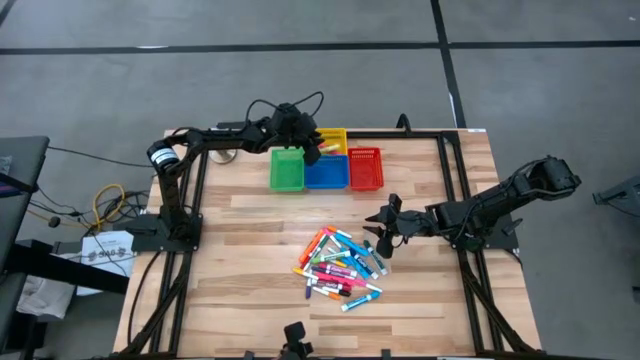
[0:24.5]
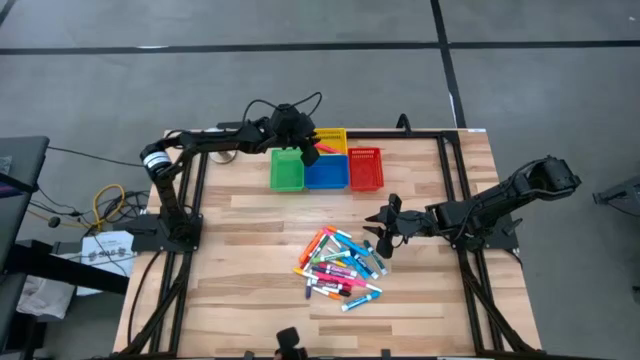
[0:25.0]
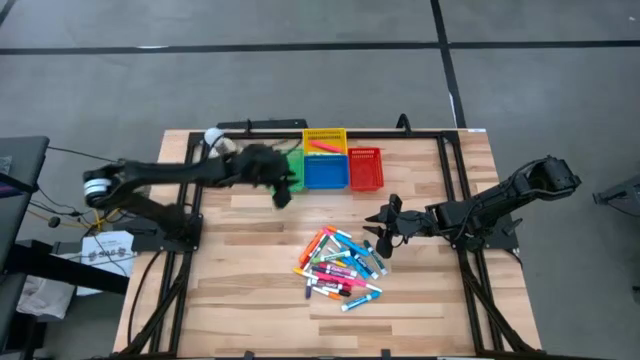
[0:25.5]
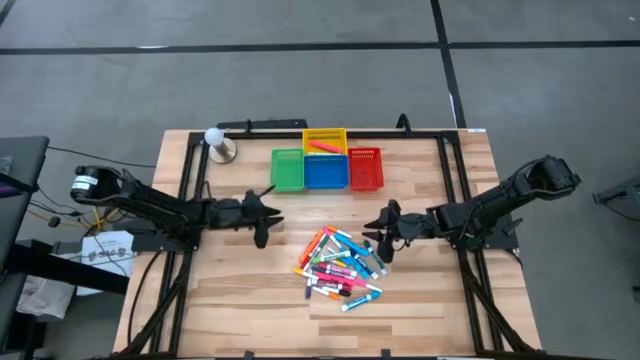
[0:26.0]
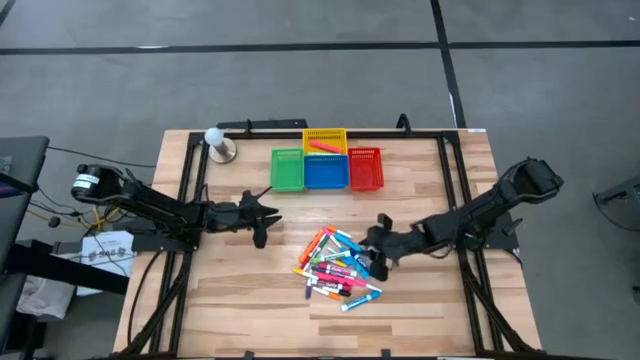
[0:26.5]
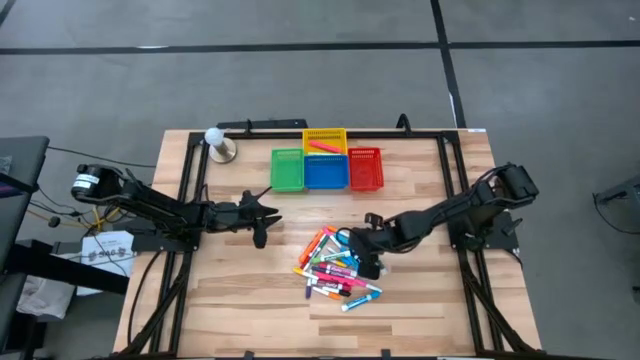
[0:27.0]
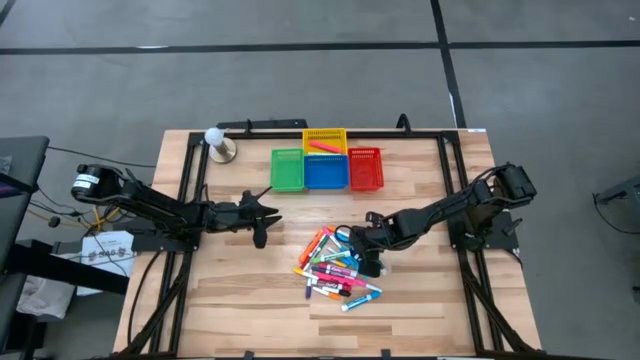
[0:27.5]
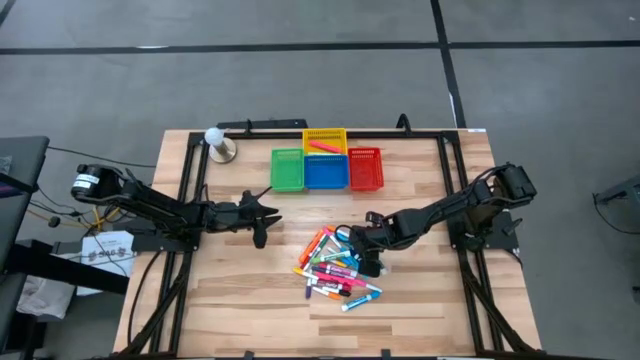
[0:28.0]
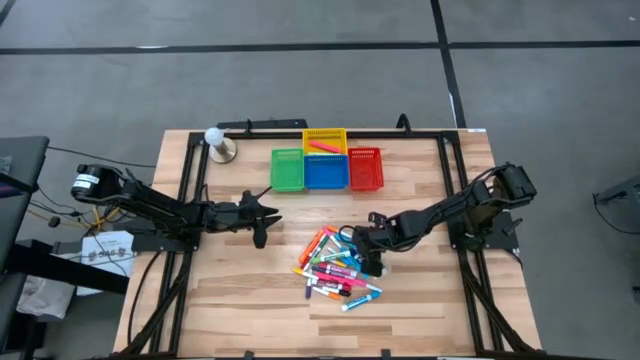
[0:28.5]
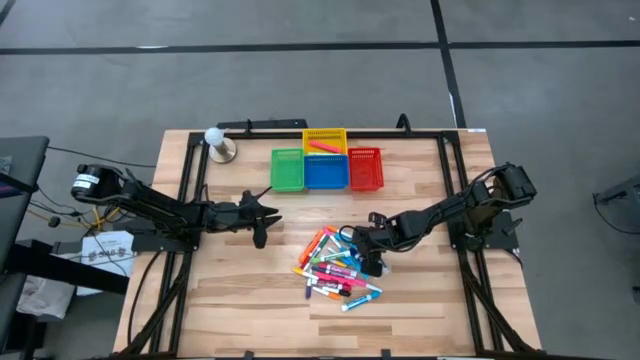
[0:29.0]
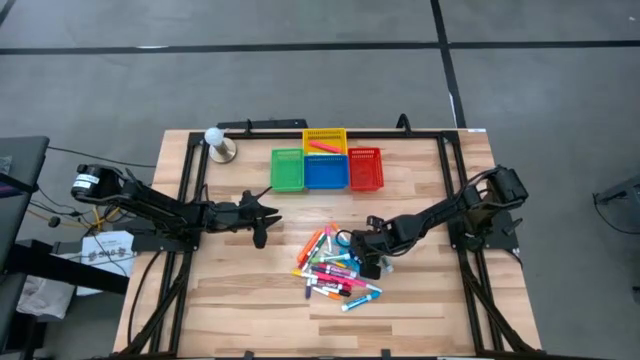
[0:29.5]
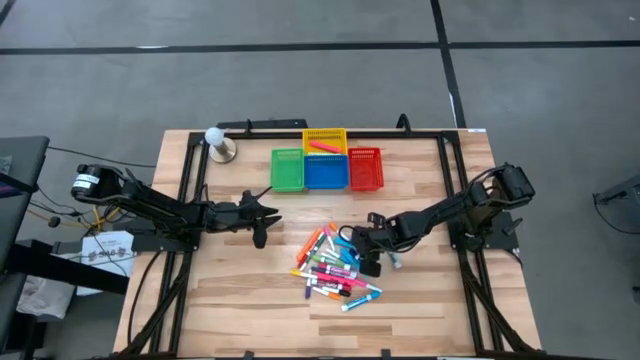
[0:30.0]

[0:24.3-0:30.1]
Task: Pick & Place Markers
Put the top large blue highlighter pen into the yellow bin

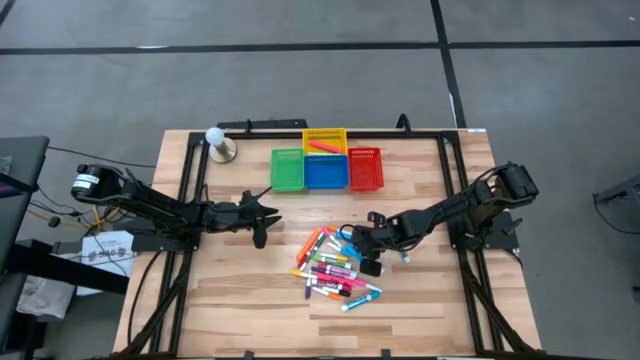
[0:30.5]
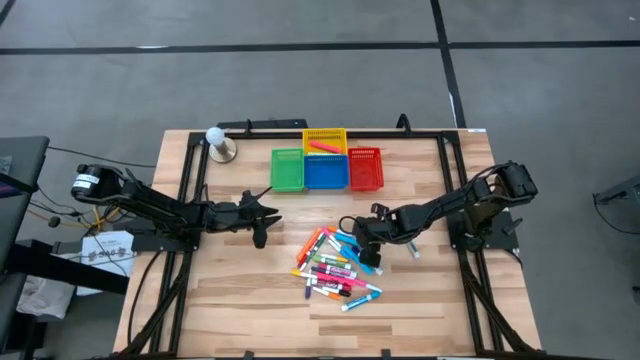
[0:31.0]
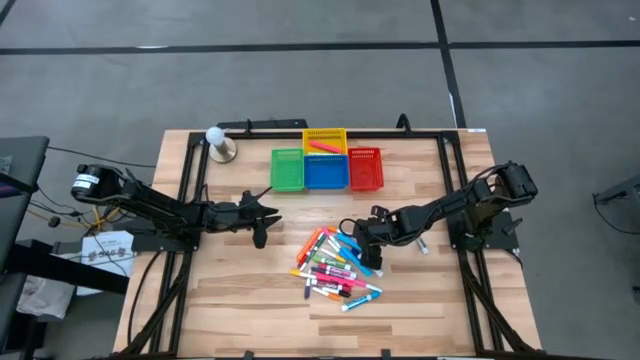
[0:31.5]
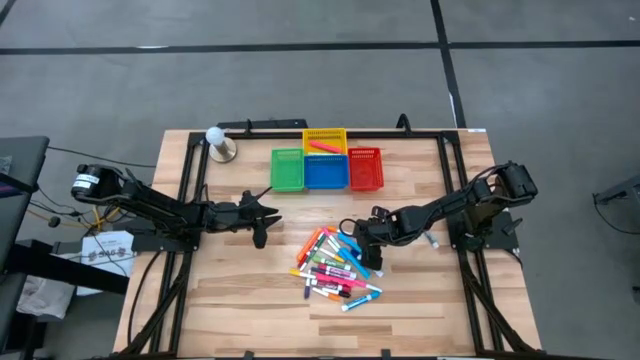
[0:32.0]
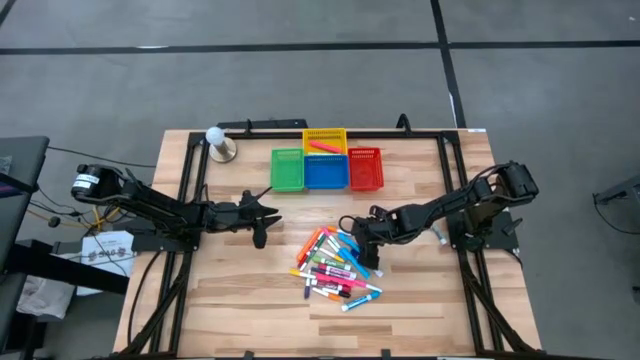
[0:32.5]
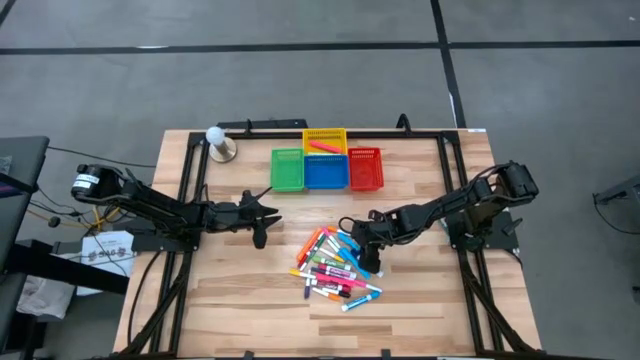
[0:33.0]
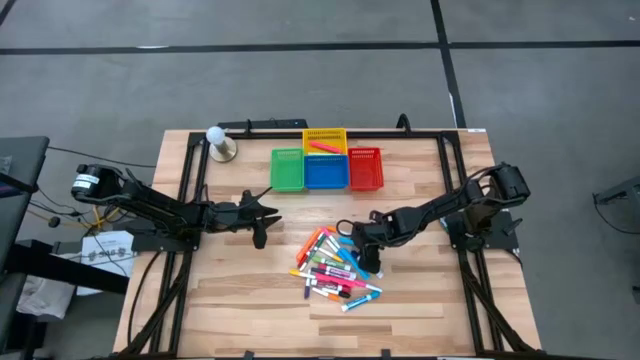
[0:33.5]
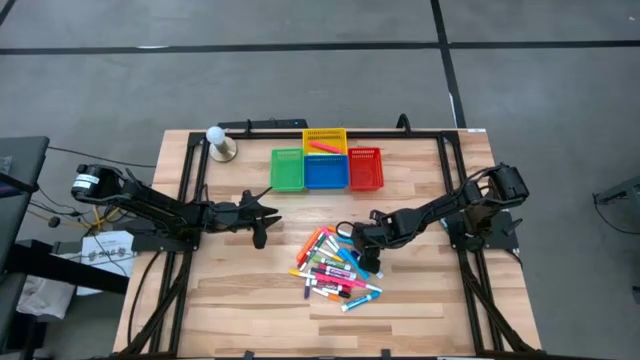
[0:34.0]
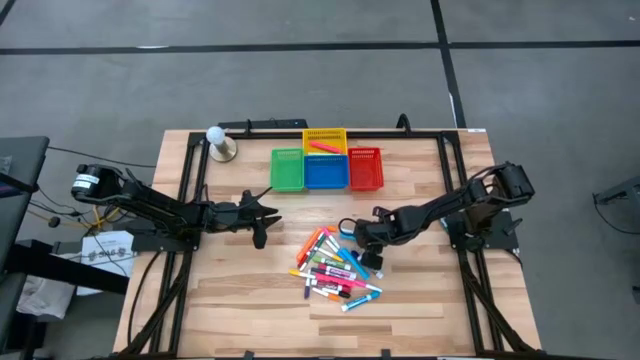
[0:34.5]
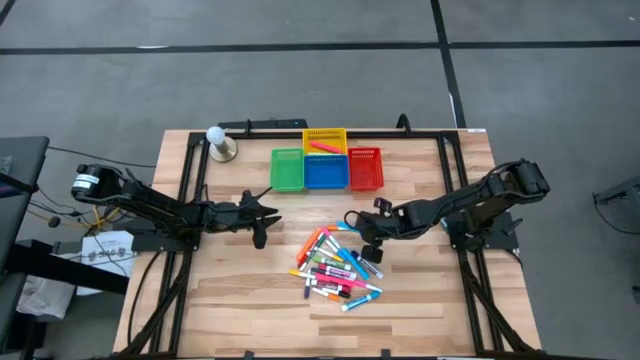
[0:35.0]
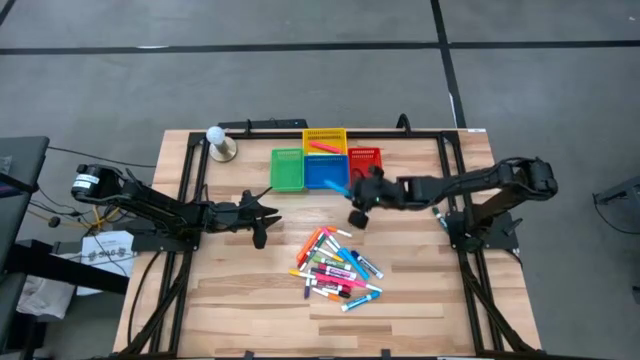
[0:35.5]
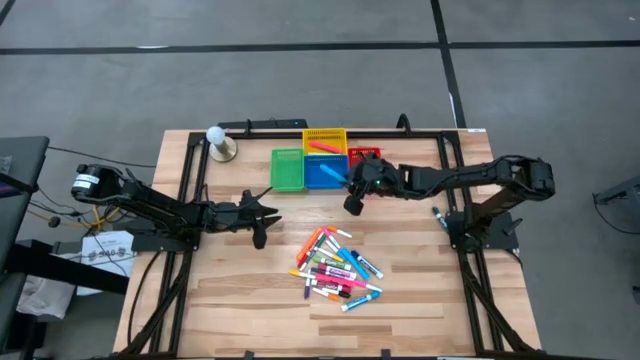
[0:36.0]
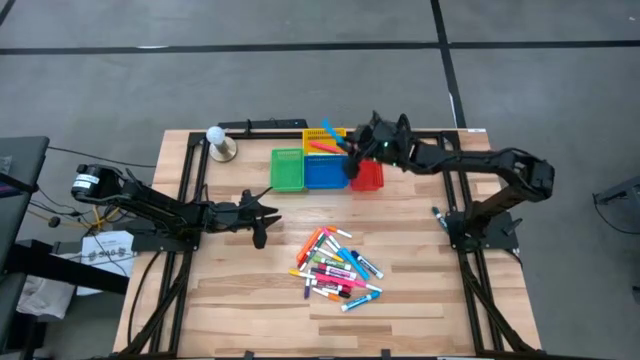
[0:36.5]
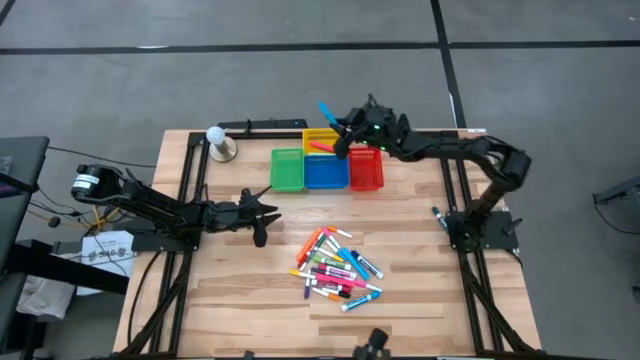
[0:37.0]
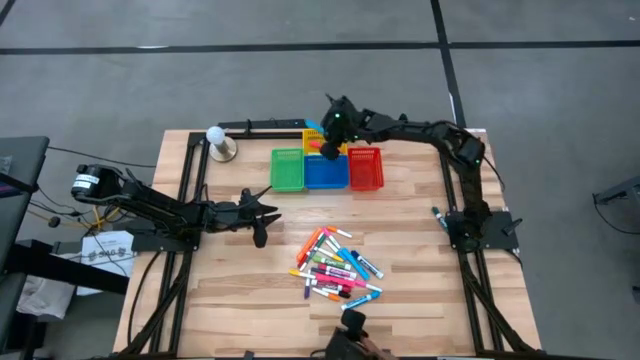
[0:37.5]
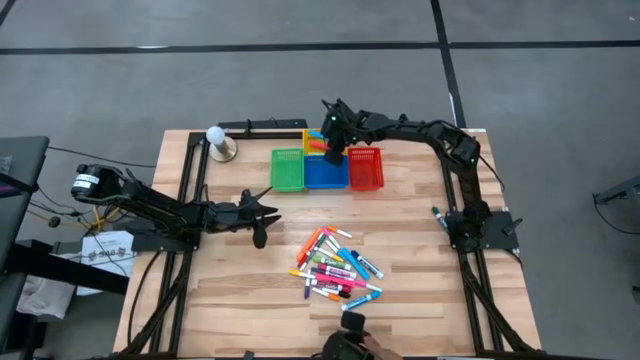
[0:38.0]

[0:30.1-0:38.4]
Put the top large blue highlighter pen into the yellow bin

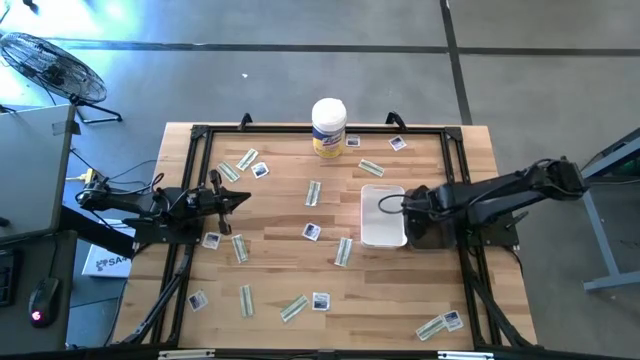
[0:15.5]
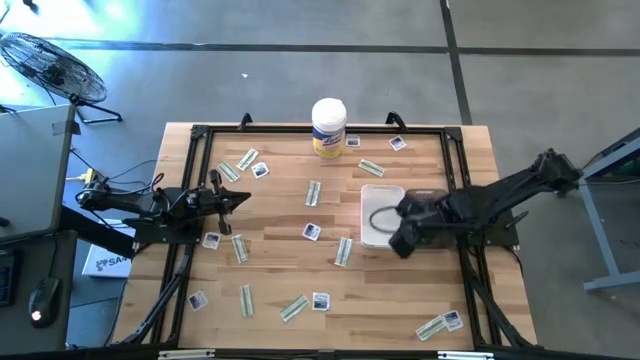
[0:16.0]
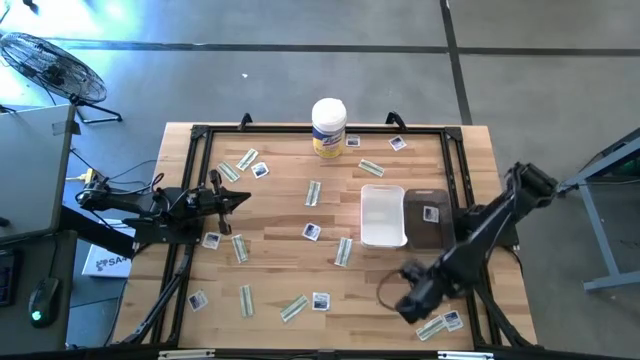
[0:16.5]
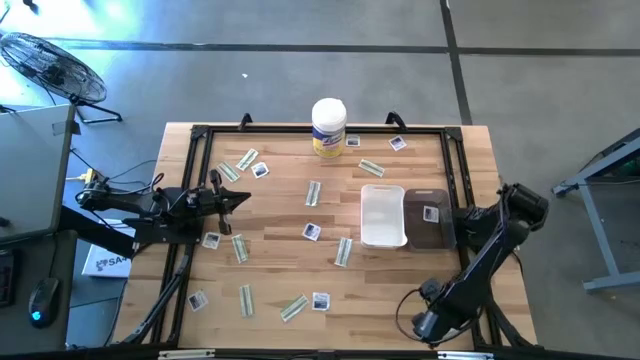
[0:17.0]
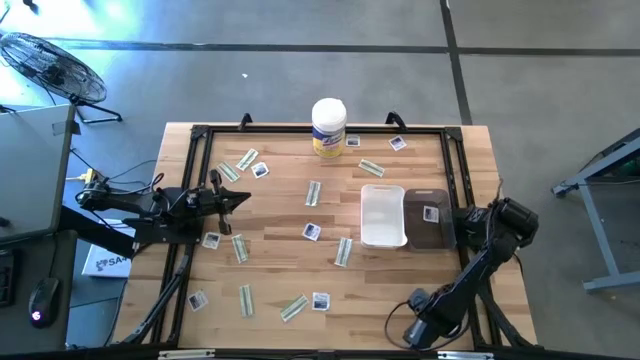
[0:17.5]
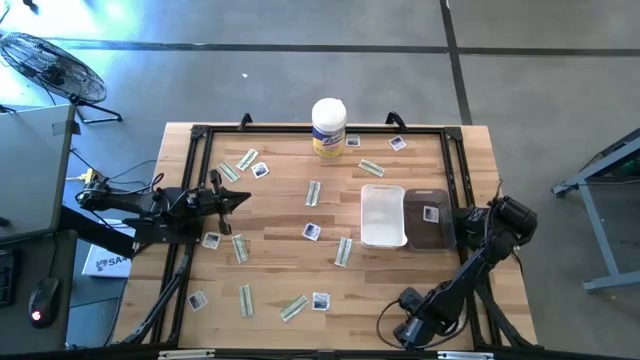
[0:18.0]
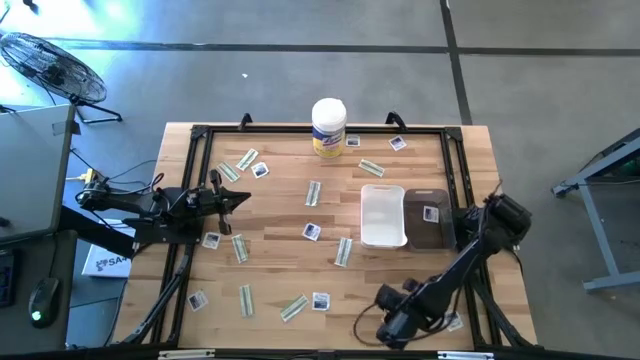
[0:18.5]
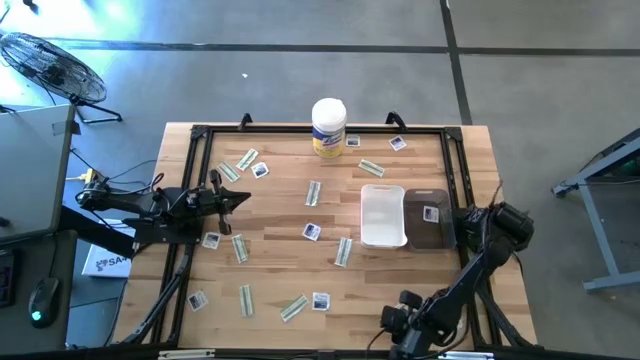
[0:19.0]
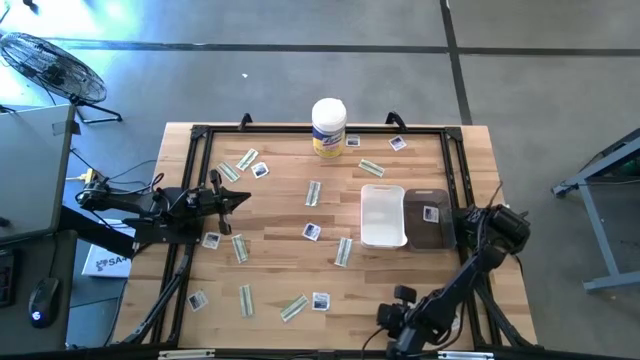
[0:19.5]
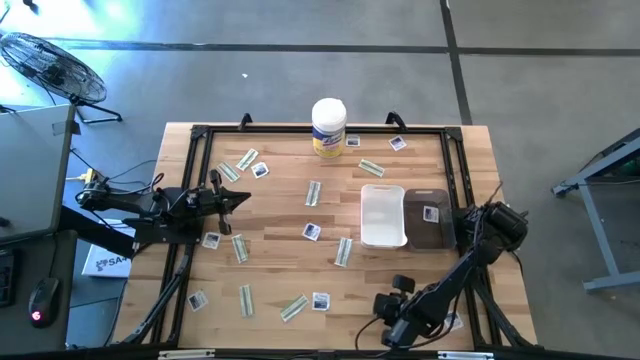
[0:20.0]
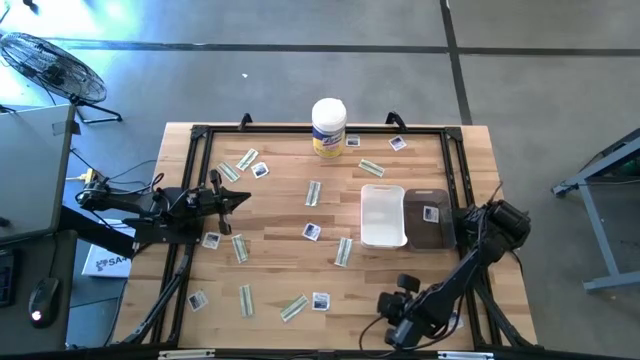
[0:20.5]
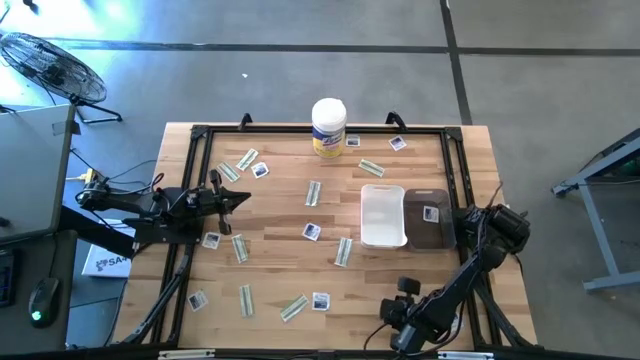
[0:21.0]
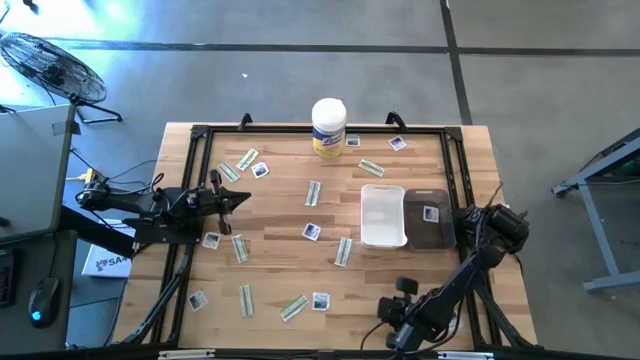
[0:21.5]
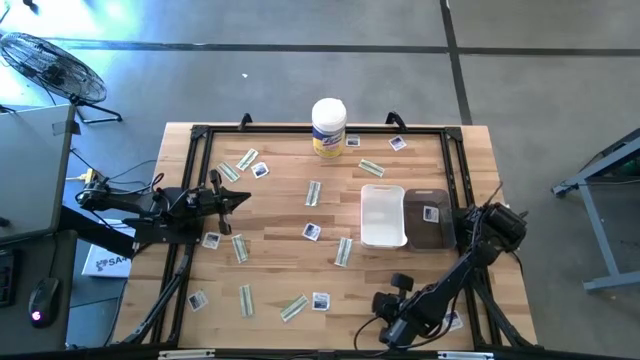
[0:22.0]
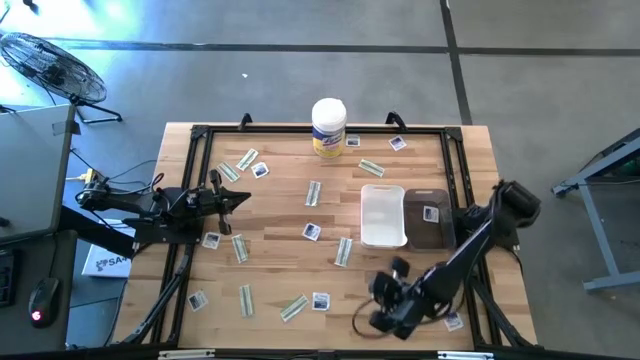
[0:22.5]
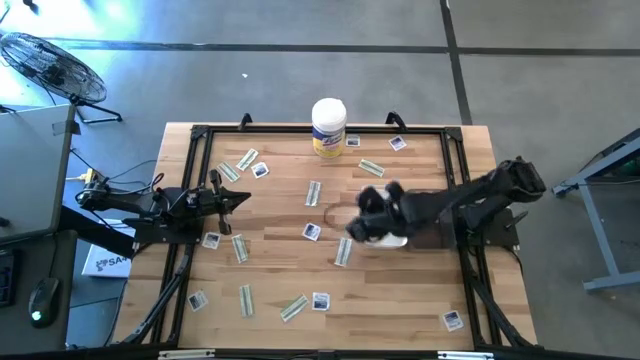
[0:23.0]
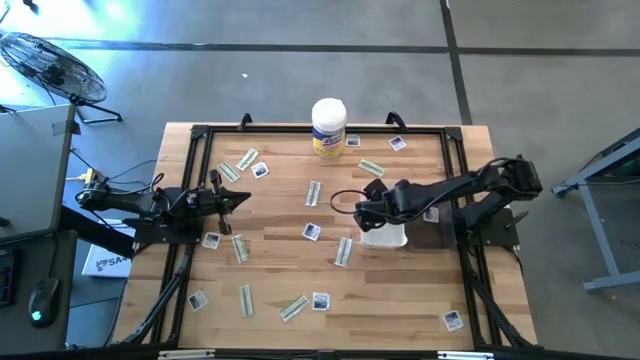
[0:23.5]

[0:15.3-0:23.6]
Task: Pick & Place First Aid Supplies
Put the green bandage pack into the white bin
